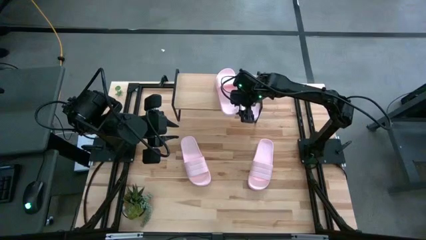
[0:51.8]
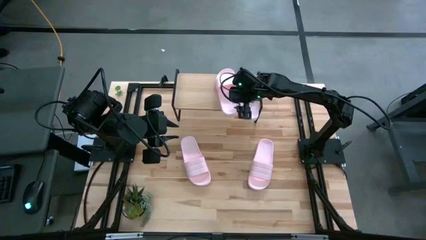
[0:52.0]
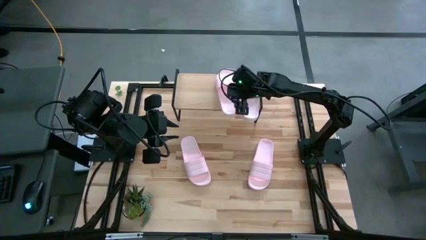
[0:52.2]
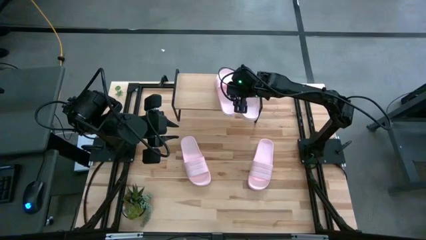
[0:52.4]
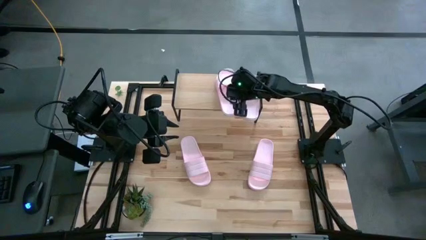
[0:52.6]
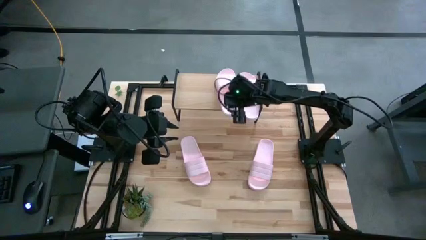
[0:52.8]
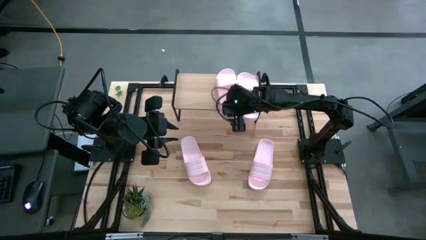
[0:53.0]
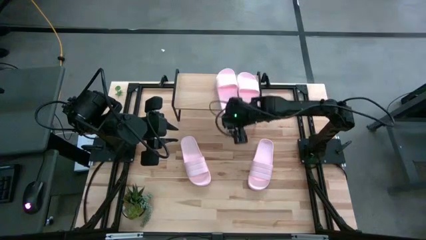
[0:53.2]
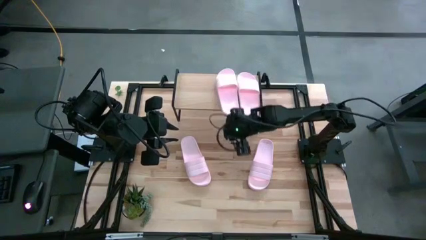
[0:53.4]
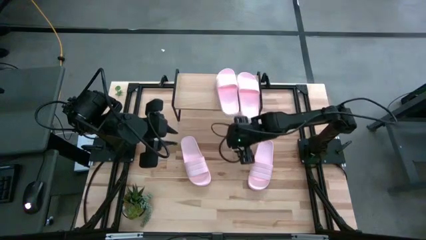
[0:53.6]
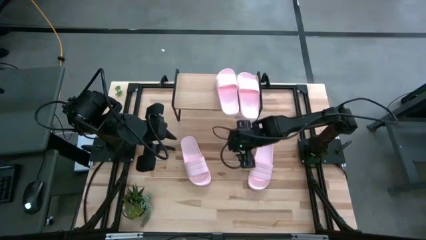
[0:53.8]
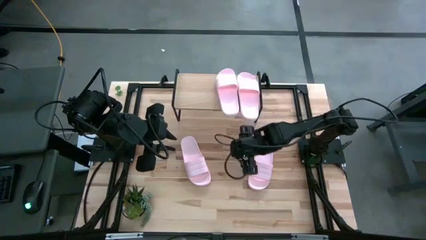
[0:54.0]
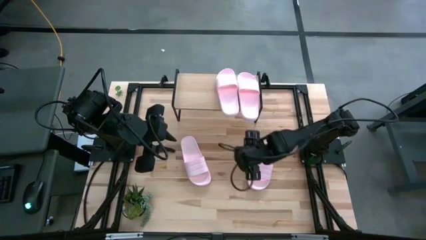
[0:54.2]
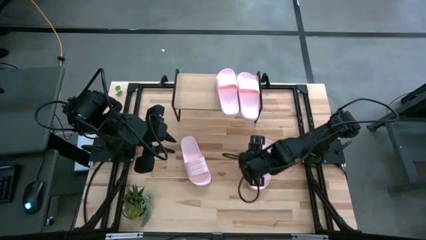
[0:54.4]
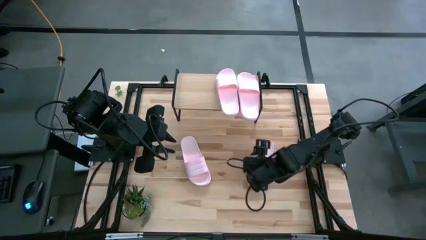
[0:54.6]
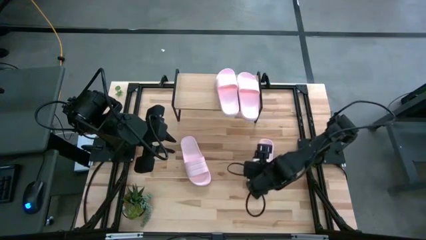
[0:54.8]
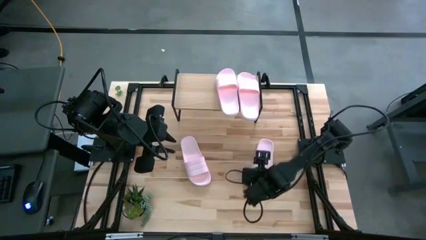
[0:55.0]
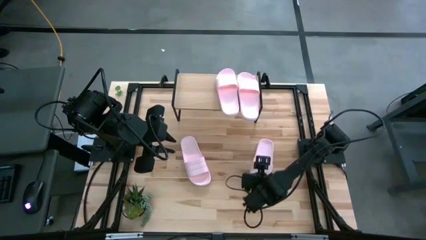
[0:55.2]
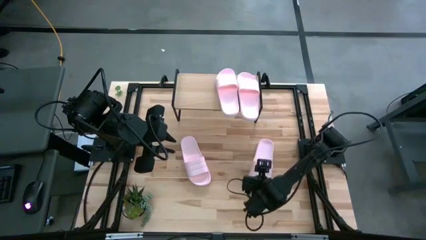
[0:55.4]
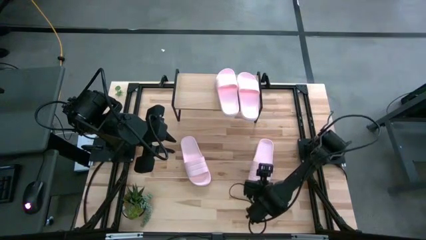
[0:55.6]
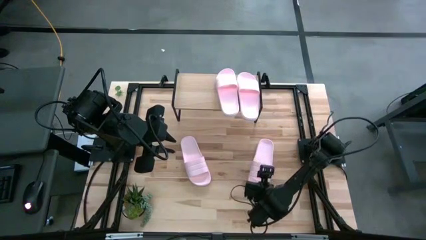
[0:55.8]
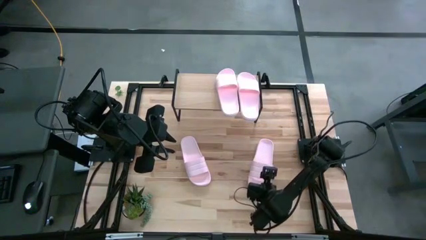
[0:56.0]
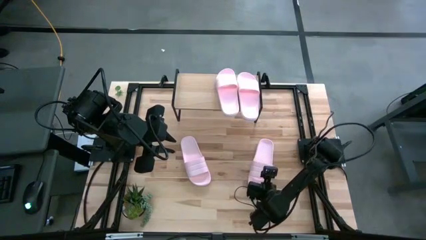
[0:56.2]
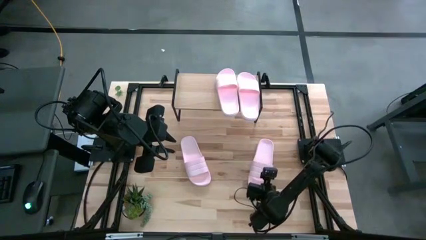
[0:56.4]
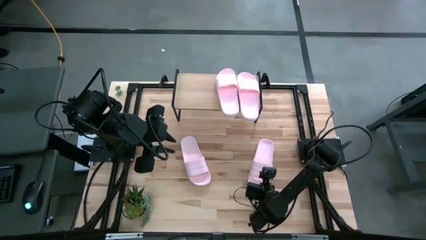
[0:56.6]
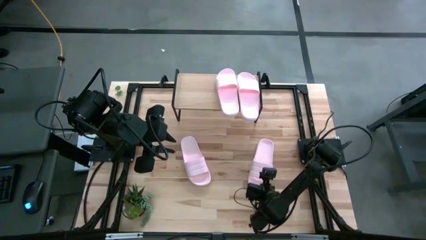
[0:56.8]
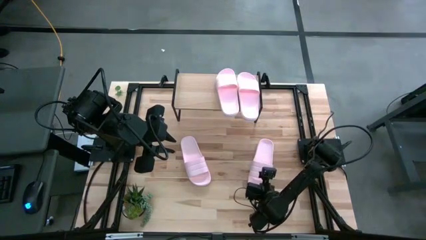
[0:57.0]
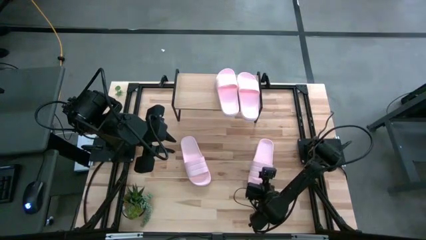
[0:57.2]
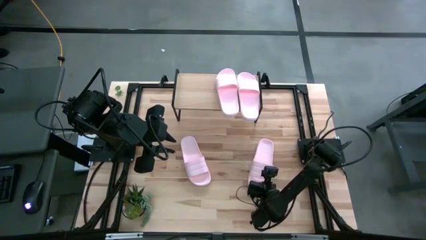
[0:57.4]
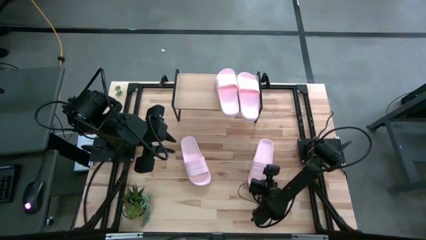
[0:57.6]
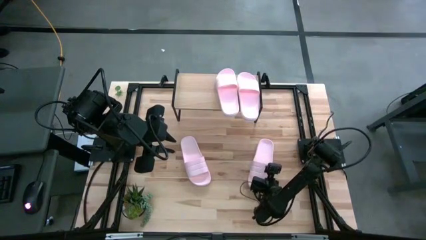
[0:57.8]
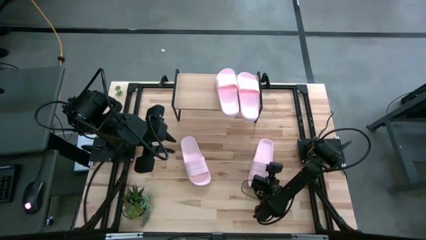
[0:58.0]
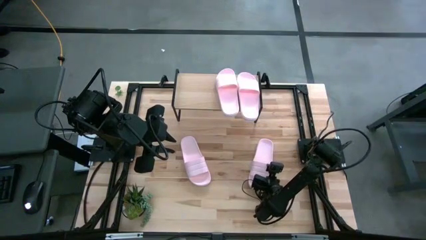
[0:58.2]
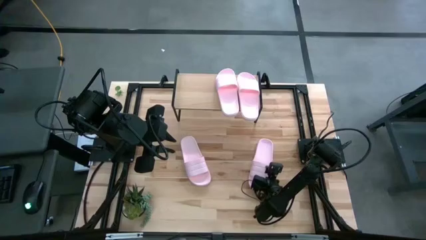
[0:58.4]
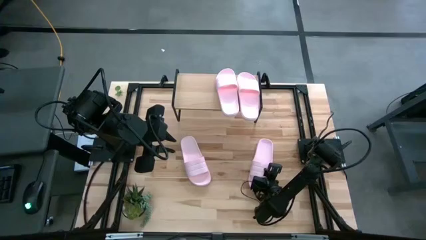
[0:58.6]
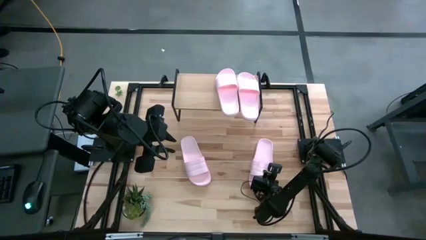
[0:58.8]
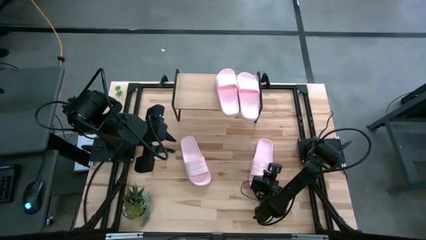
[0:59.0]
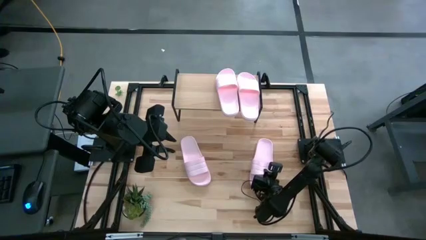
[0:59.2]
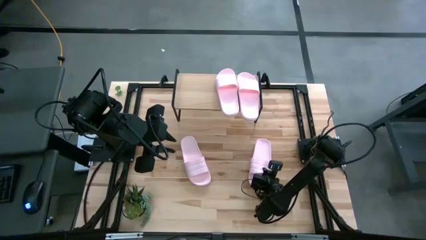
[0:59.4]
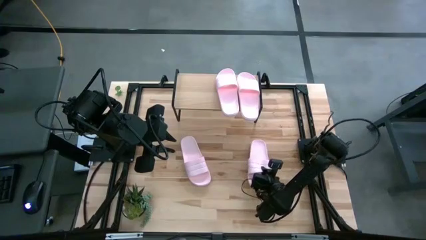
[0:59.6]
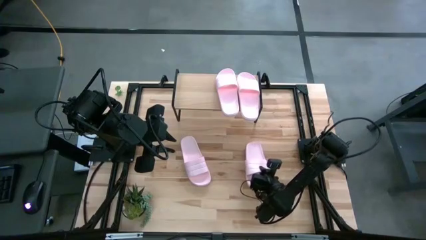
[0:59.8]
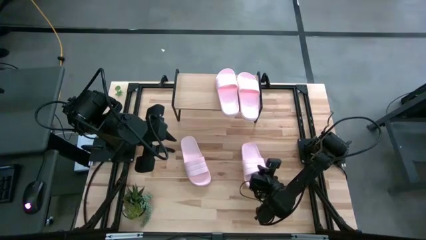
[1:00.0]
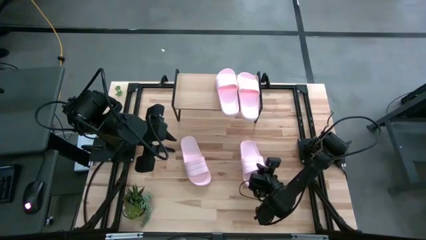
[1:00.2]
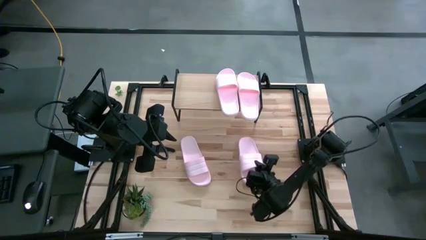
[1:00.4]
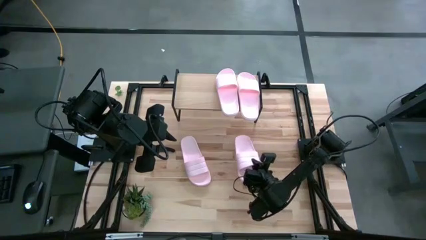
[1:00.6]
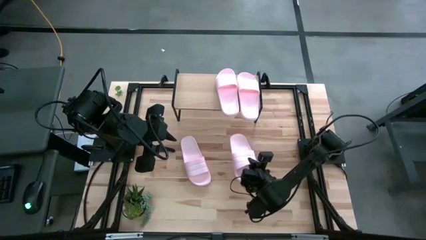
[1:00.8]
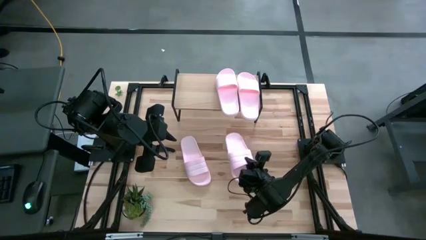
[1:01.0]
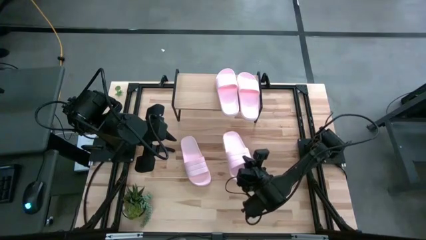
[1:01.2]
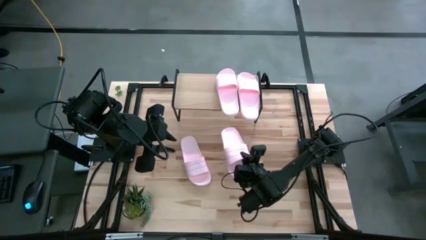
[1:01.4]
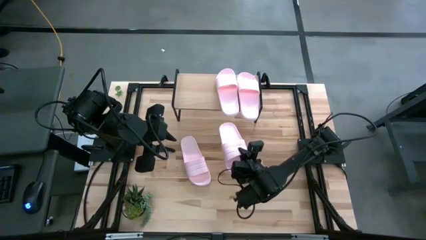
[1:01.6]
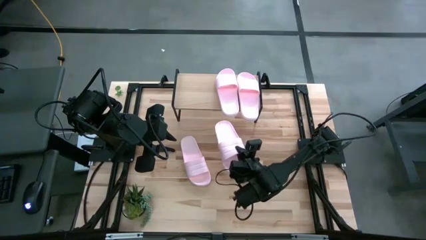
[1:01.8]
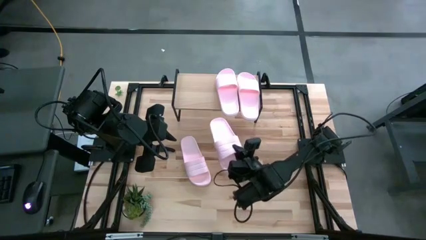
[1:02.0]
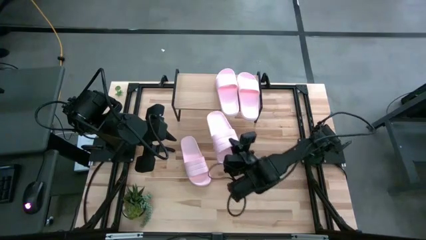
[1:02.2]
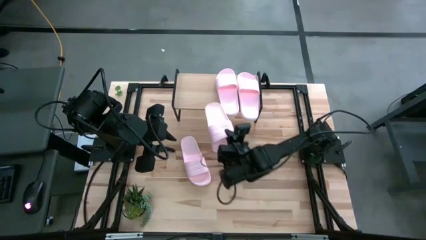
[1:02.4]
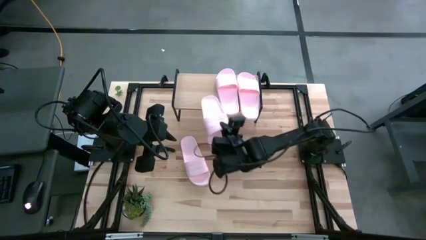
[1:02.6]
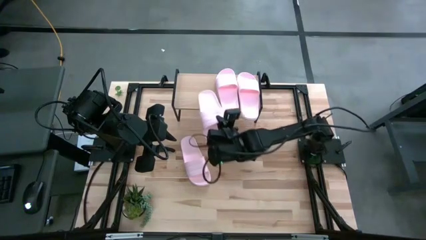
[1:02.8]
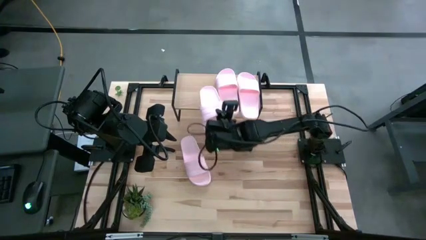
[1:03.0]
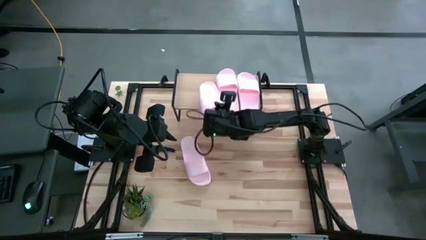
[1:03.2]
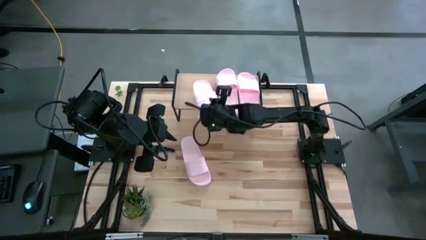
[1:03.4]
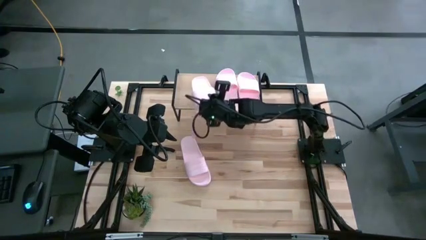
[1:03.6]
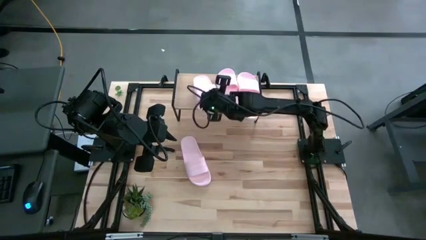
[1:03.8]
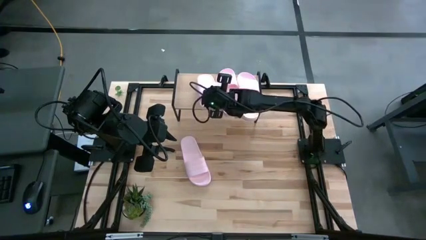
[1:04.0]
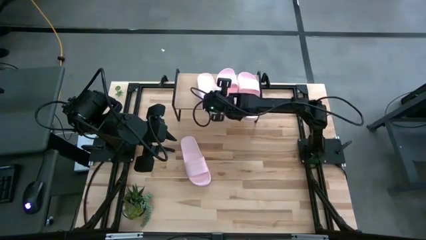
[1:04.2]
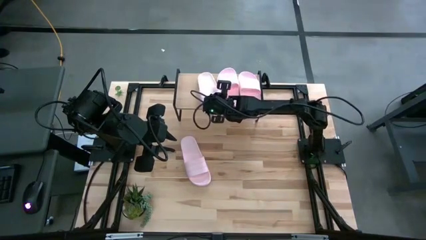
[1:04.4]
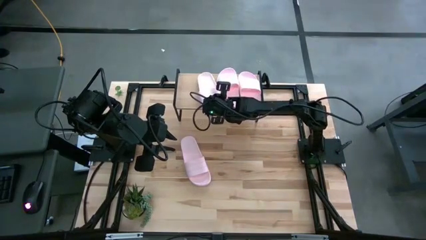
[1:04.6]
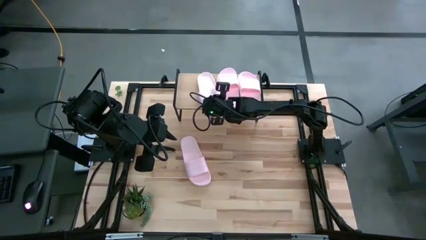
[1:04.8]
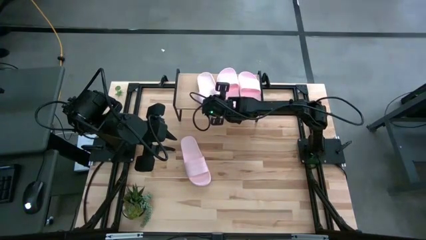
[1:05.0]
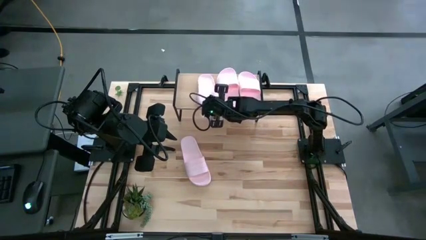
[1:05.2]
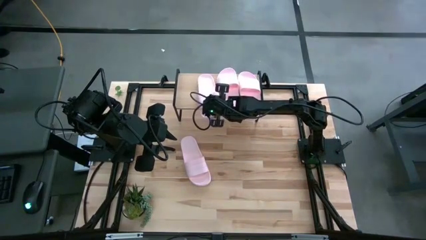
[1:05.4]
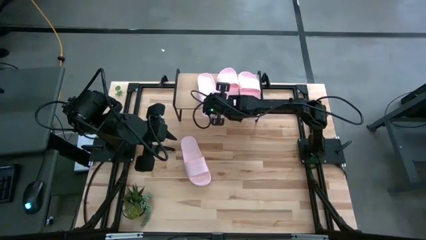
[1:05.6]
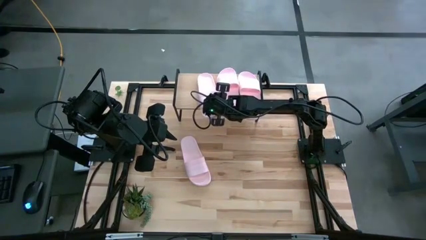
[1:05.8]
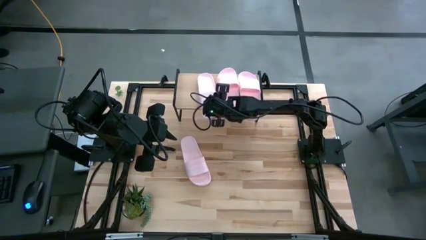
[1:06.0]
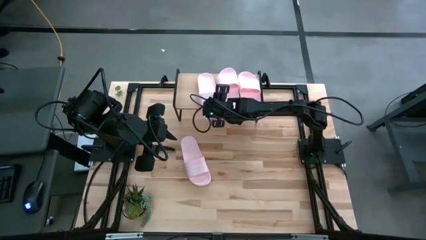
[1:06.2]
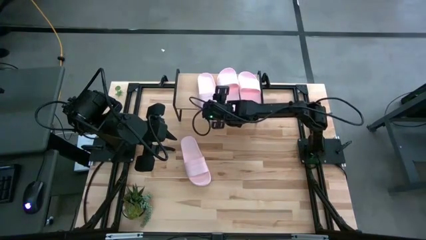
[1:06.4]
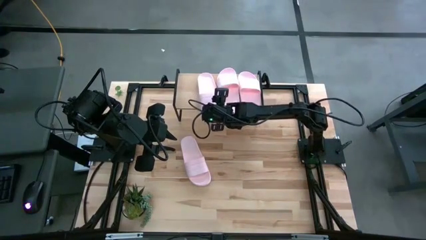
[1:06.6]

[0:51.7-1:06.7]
Task: Pick and place slides into the shelf
Put the white slide on the shelf
